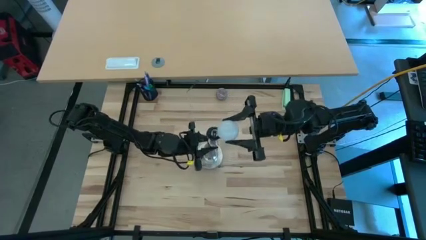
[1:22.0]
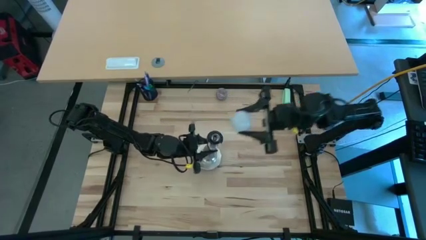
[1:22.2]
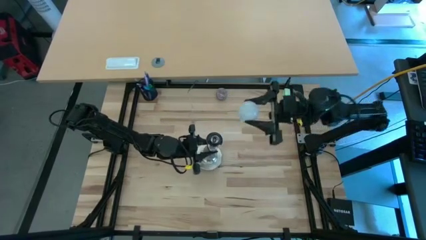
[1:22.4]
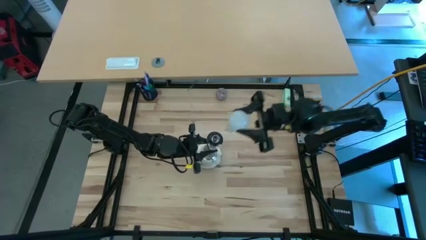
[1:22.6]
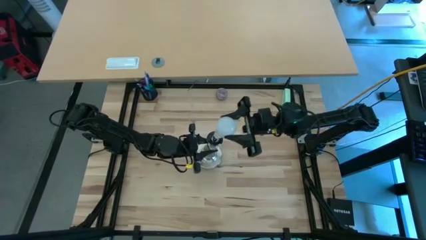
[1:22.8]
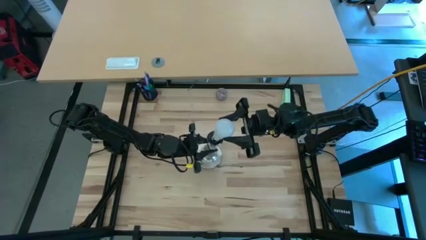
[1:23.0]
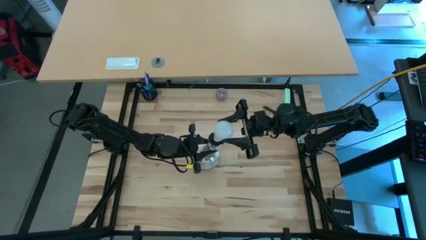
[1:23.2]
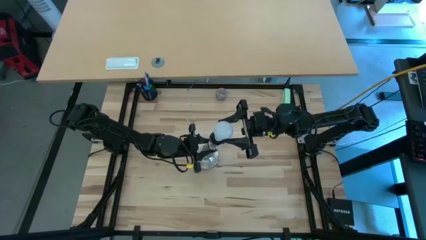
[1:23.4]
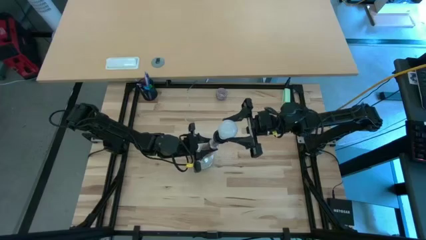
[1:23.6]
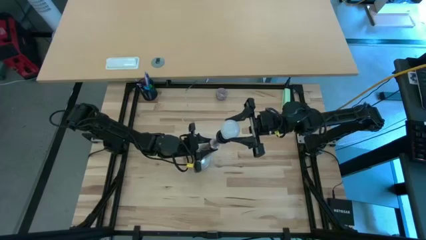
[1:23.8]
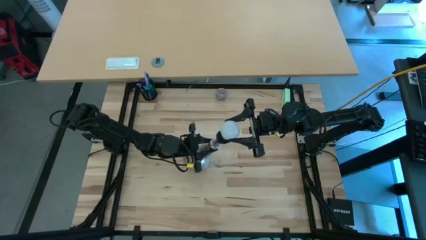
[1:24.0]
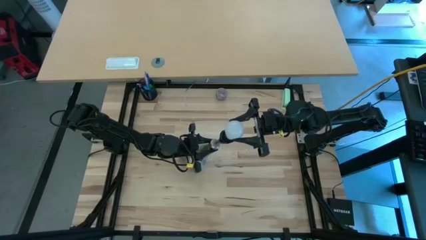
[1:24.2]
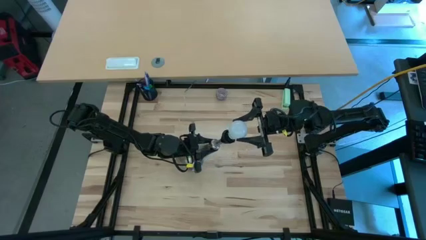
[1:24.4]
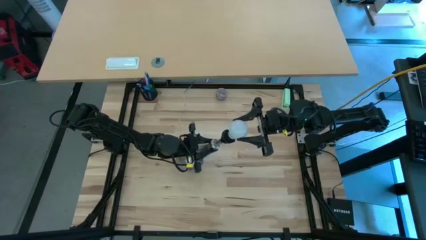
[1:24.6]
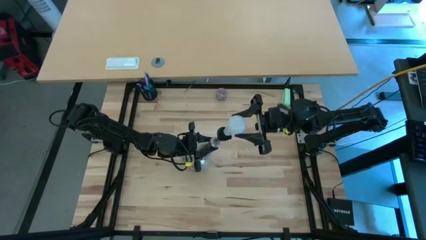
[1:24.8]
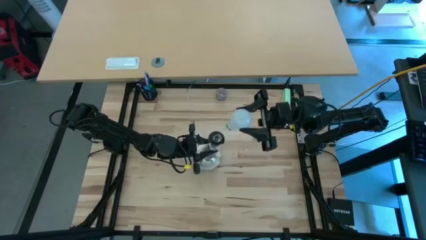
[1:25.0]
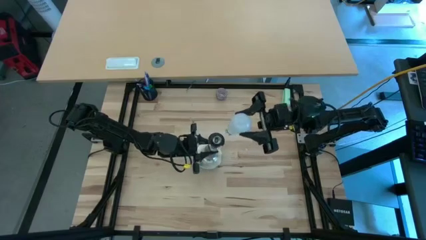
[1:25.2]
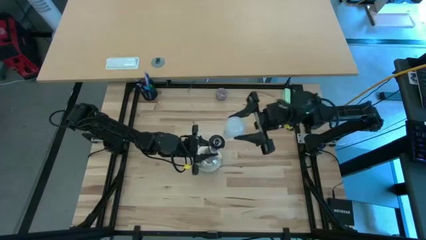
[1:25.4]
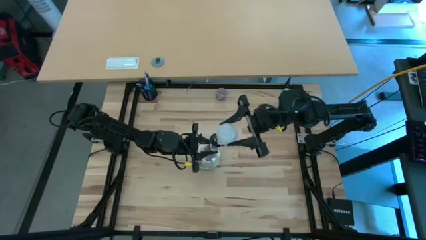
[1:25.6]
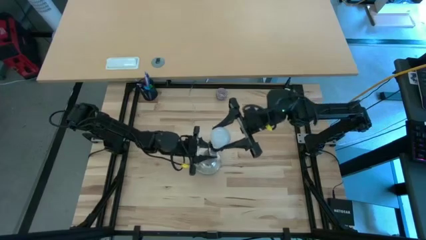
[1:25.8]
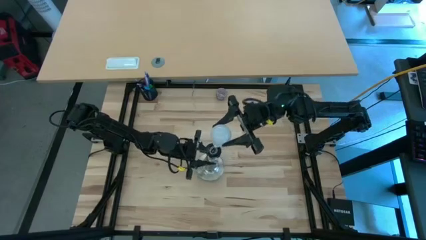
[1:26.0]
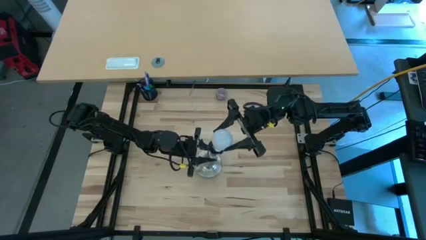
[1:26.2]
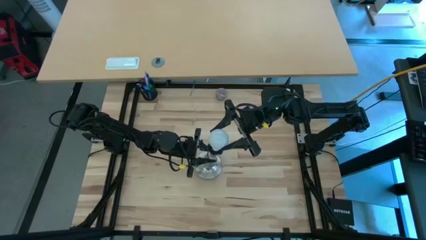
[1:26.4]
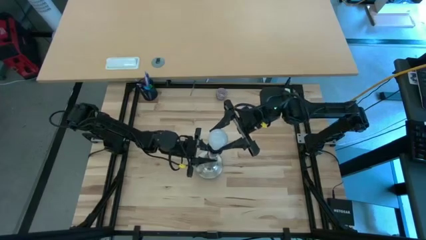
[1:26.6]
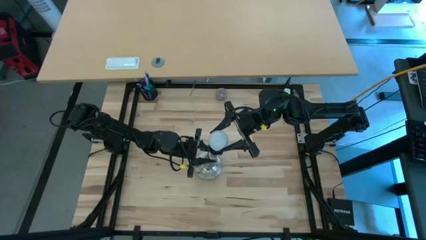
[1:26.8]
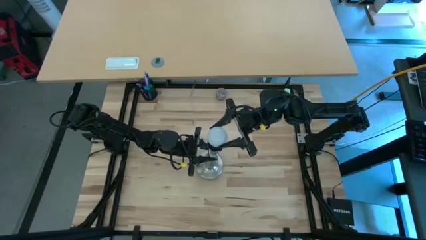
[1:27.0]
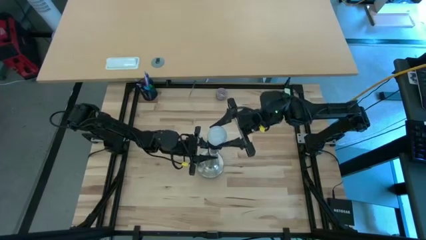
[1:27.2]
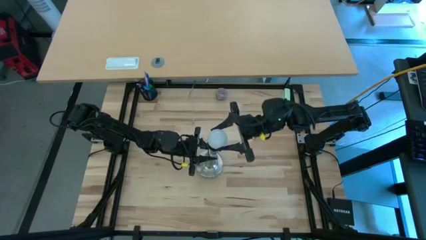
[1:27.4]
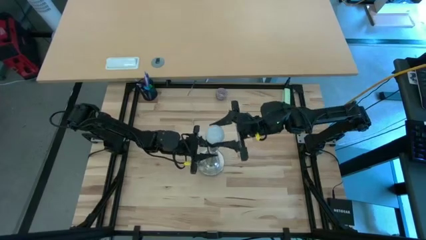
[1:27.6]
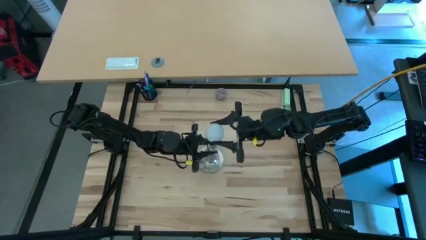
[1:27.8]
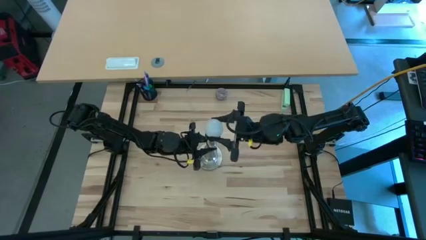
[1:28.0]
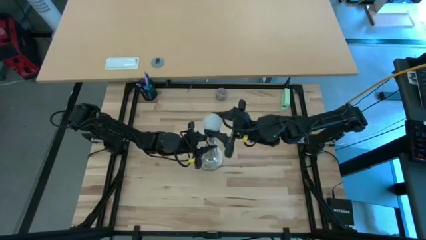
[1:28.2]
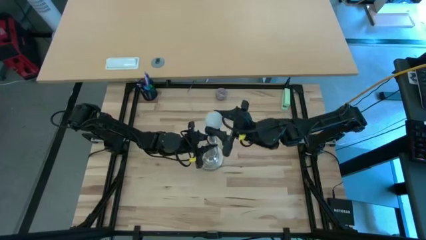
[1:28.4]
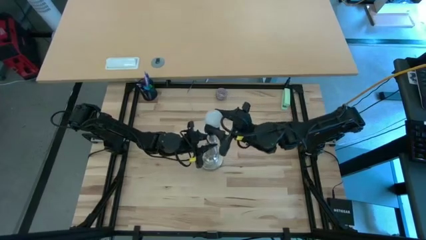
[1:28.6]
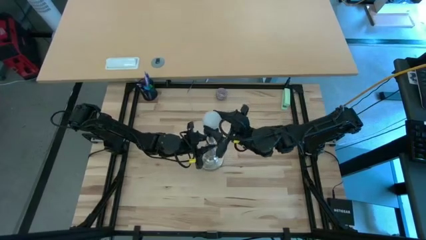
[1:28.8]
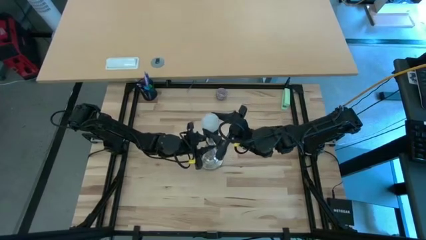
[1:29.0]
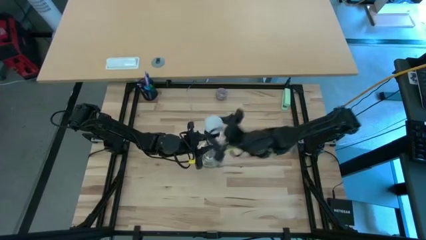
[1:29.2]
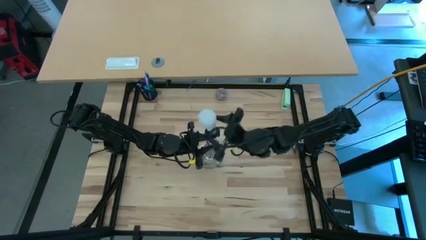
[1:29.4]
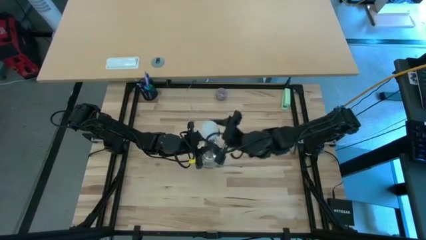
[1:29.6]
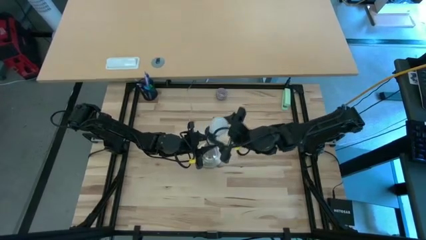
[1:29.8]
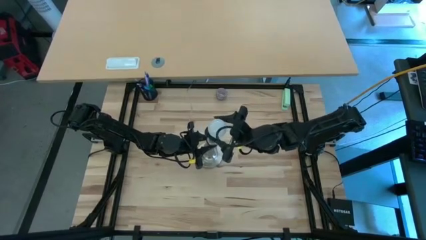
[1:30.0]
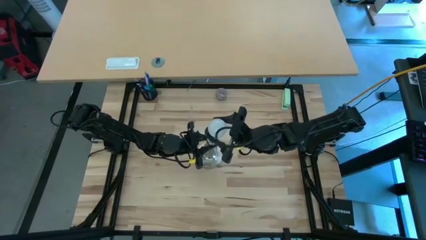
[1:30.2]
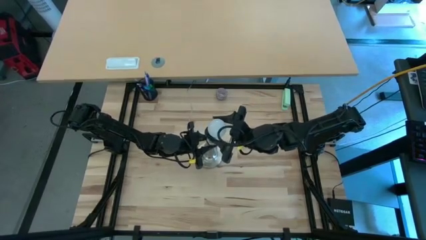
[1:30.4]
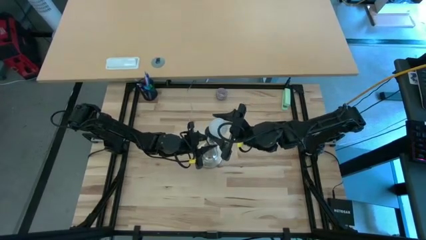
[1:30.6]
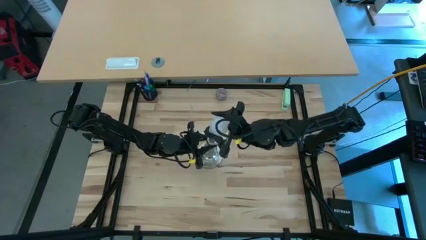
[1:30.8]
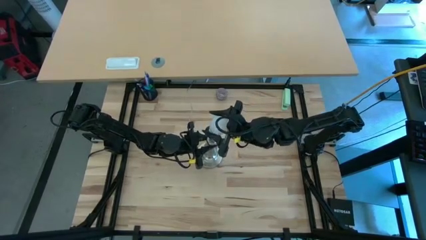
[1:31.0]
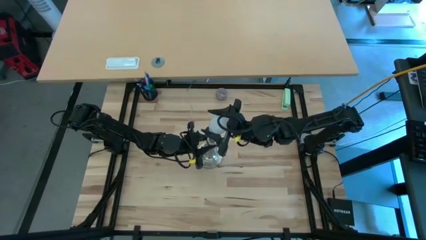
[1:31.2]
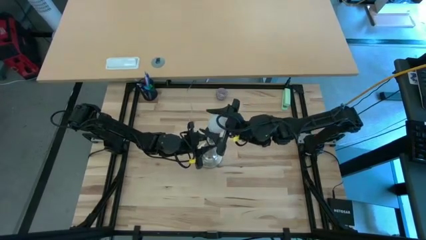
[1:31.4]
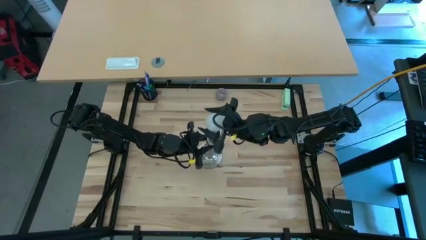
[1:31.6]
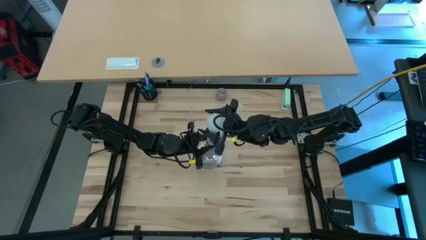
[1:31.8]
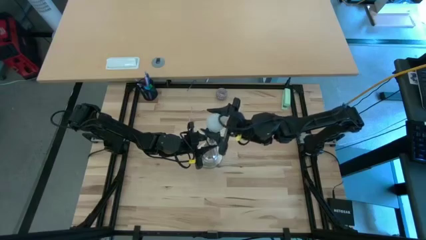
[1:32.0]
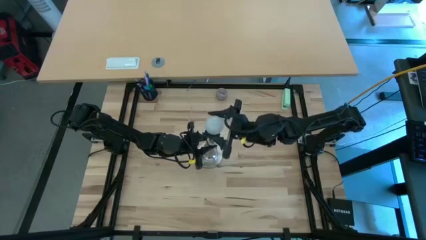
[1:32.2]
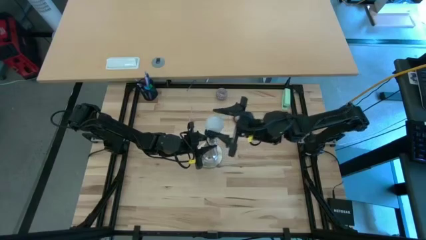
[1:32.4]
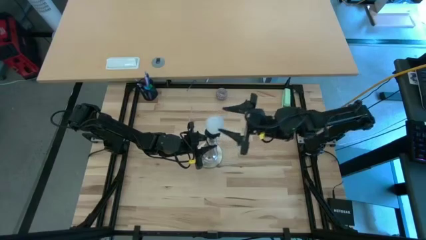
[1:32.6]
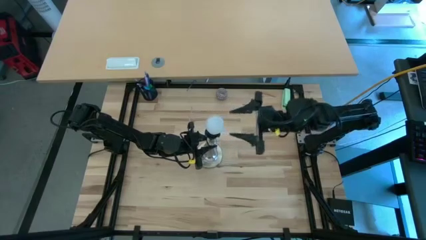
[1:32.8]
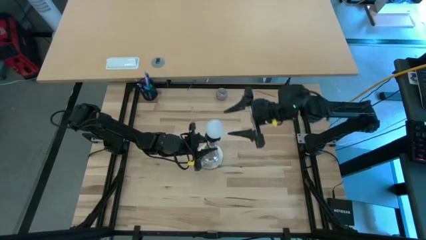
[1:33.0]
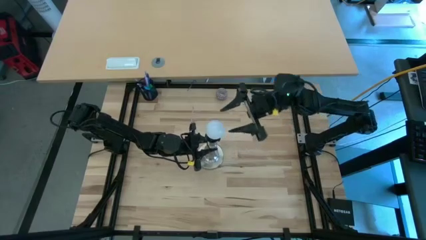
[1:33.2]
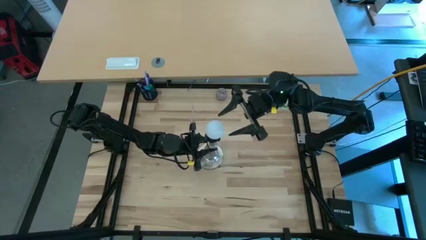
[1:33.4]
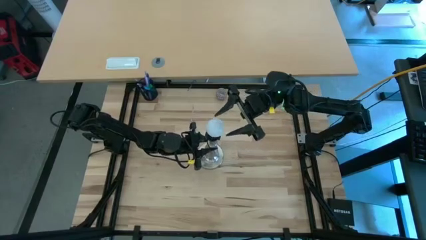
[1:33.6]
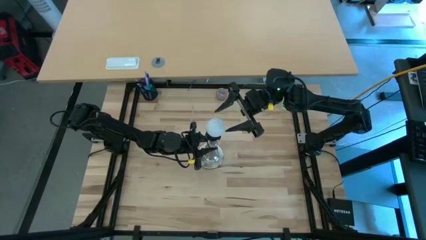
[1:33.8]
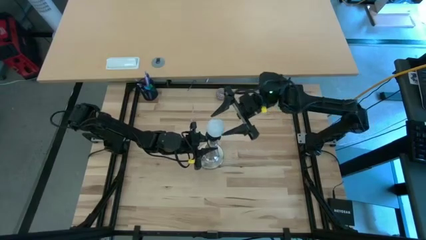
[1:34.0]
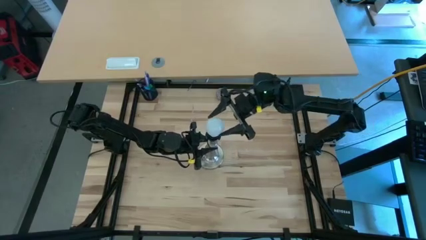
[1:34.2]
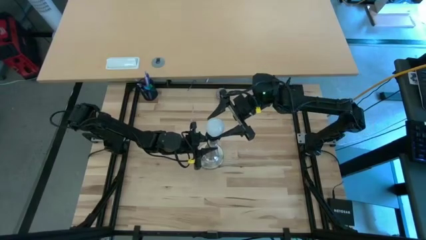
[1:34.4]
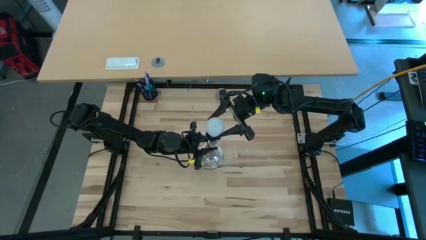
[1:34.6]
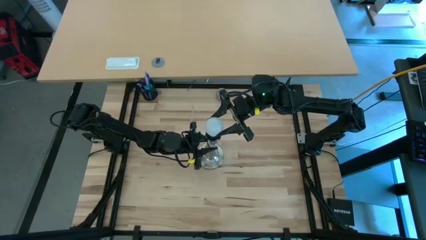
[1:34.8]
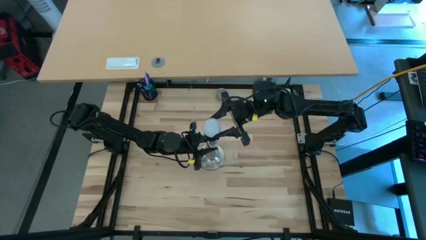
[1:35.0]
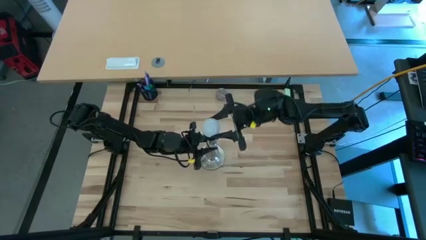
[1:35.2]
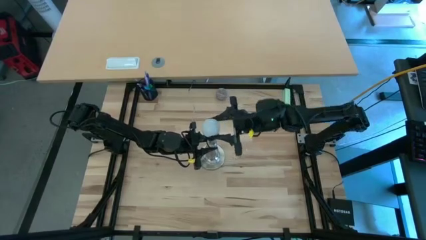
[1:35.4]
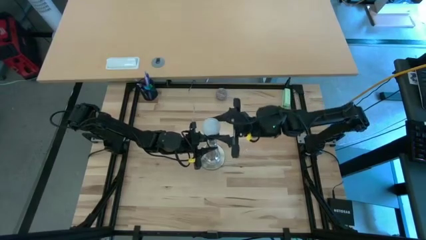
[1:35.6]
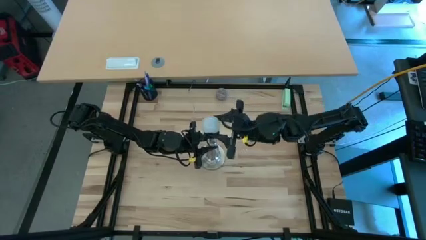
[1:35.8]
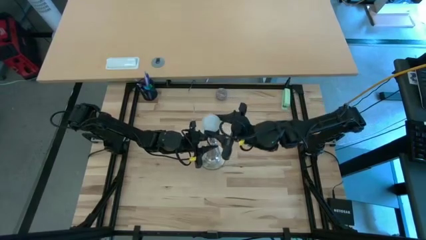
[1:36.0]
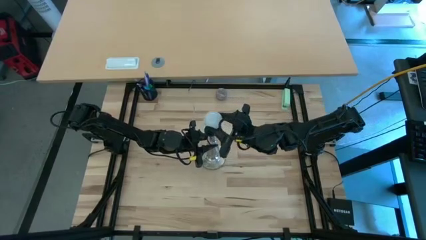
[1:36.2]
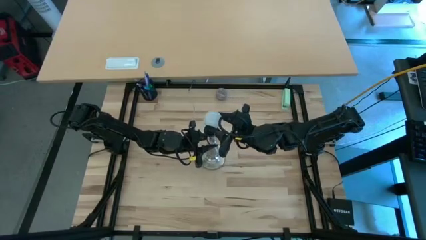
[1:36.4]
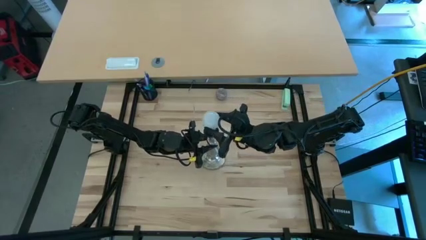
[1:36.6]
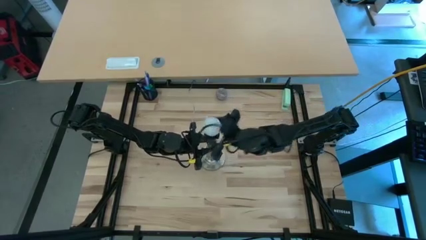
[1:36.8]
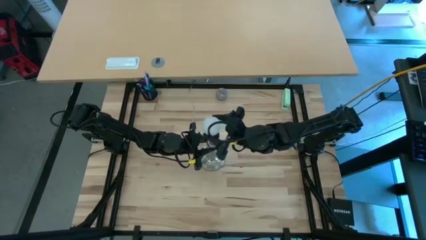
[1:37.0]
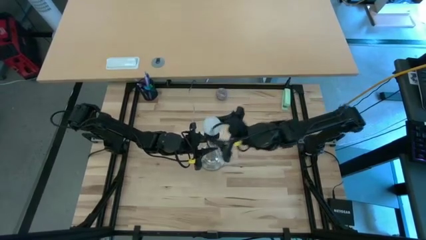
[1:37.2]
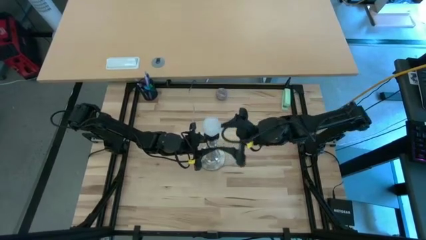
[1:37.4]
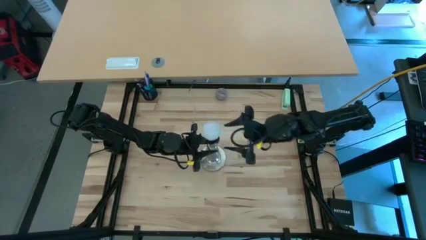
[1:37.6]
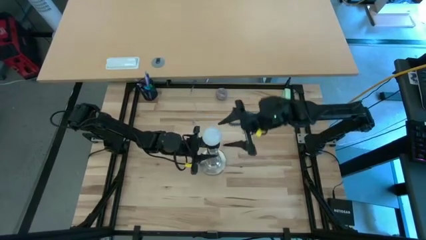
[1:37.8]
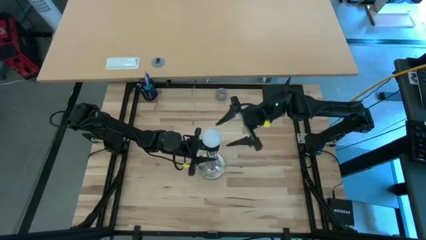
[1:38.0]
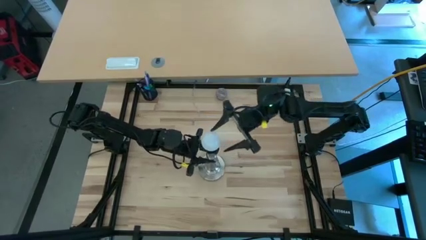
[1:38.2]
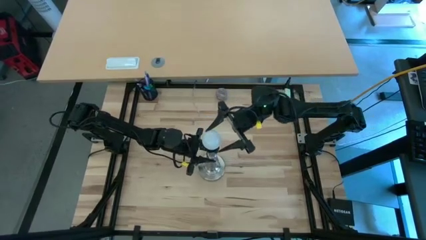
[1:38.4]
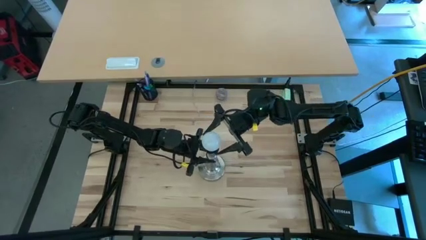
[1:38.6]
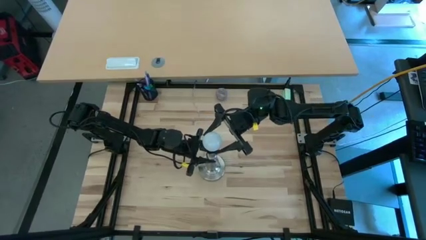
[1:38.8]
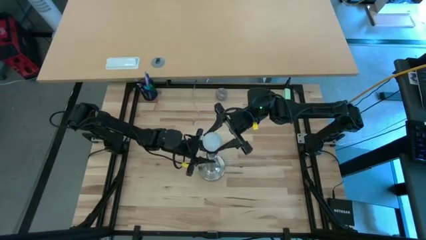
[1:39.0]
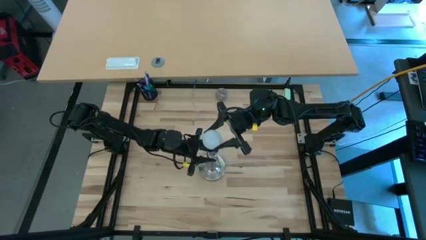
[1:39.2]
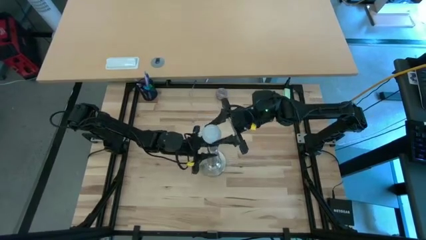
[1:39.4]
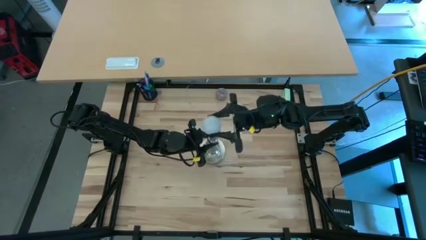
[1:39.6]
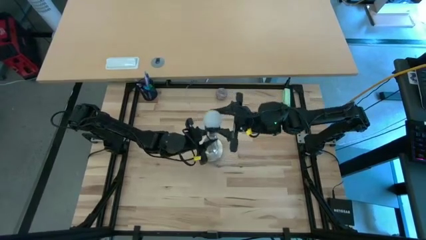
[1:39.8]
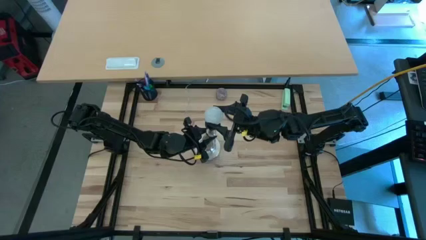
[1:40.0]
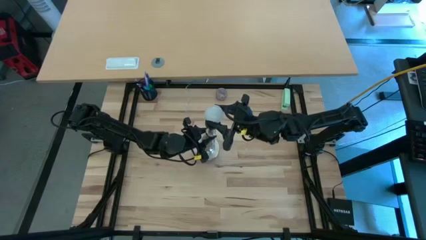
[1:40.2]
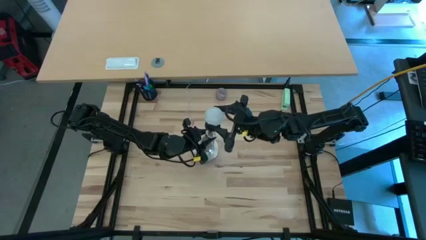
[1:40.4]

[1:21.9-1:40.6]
Task: Screw lightbulb
Insert the lightbulb into the silver lamp
